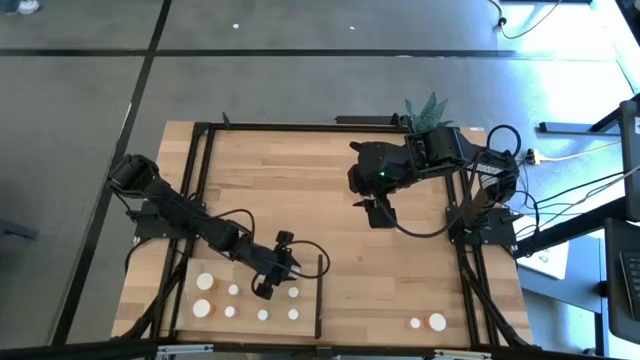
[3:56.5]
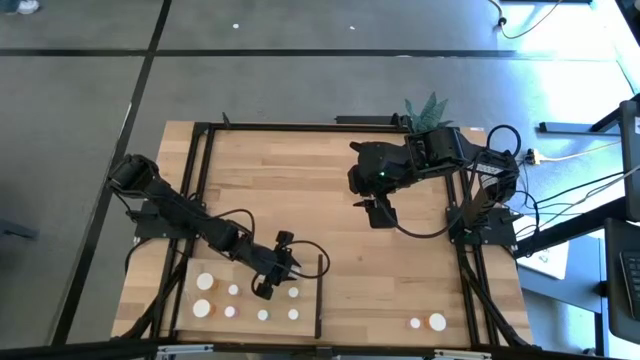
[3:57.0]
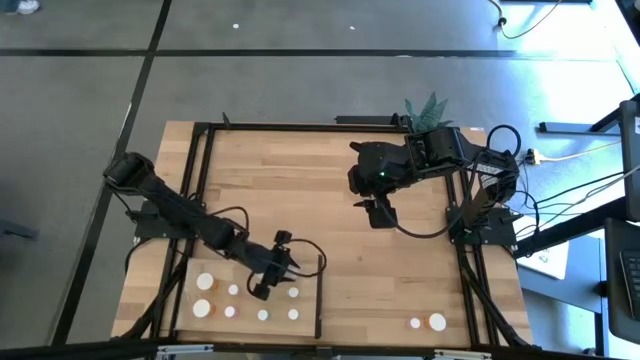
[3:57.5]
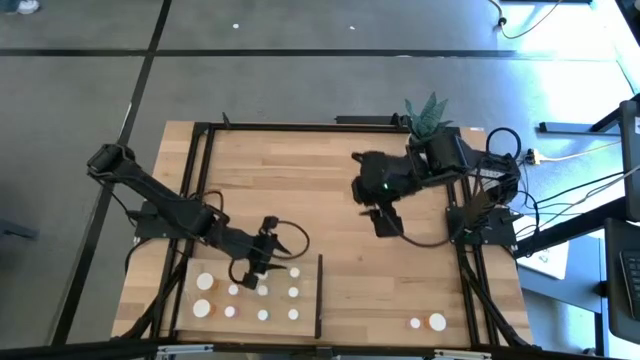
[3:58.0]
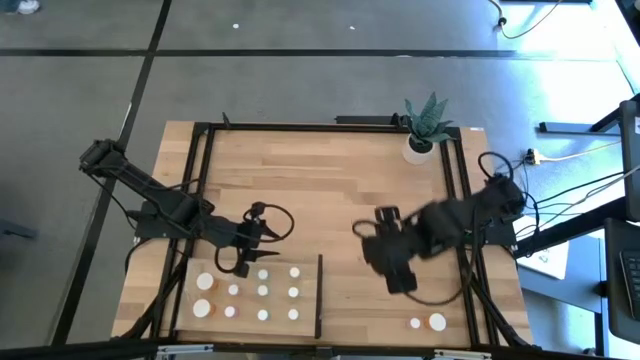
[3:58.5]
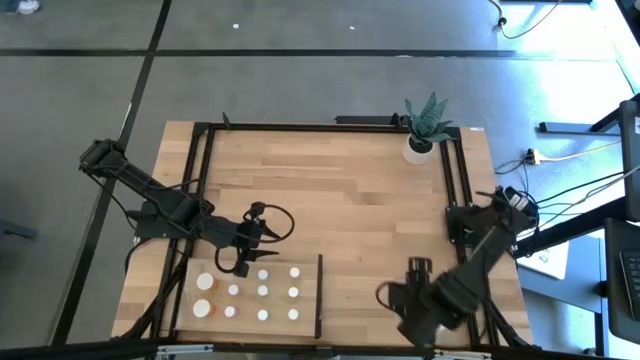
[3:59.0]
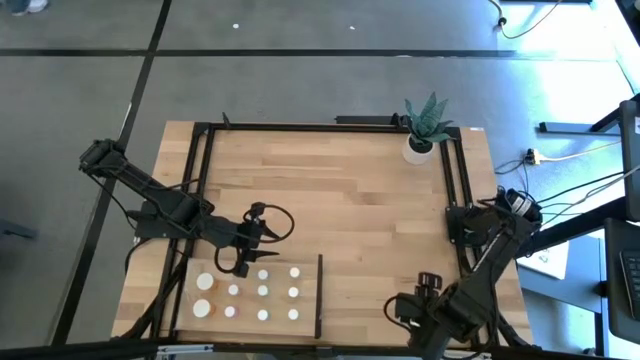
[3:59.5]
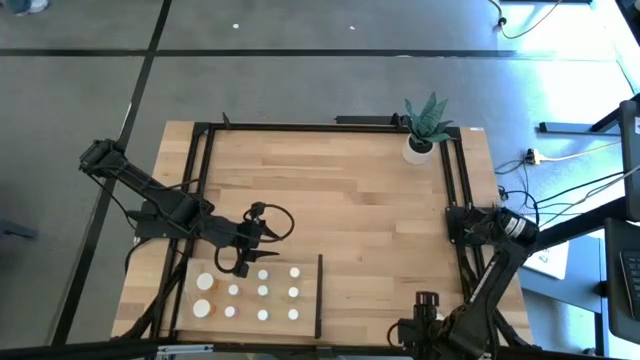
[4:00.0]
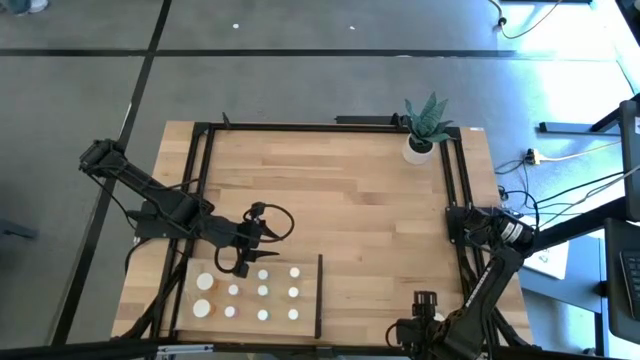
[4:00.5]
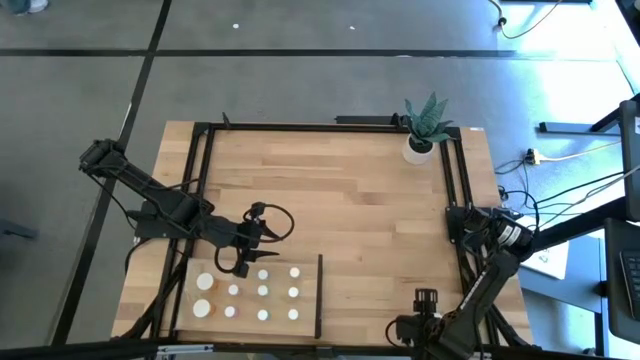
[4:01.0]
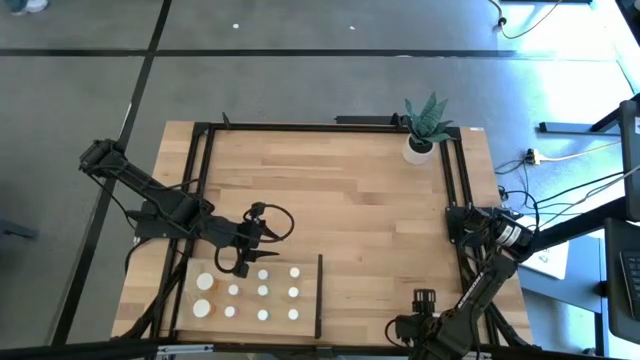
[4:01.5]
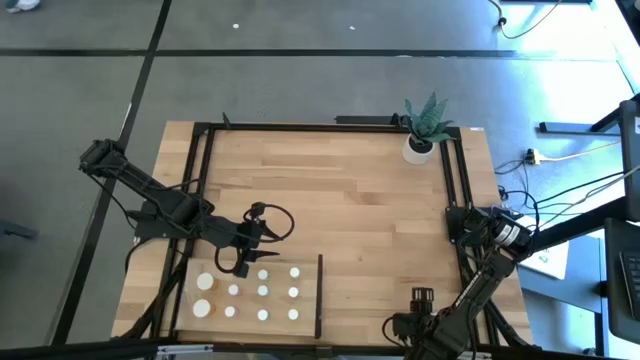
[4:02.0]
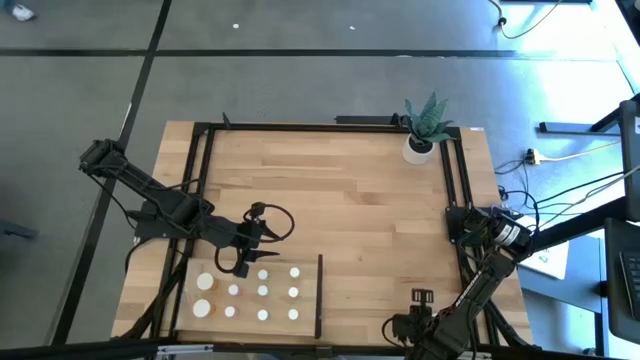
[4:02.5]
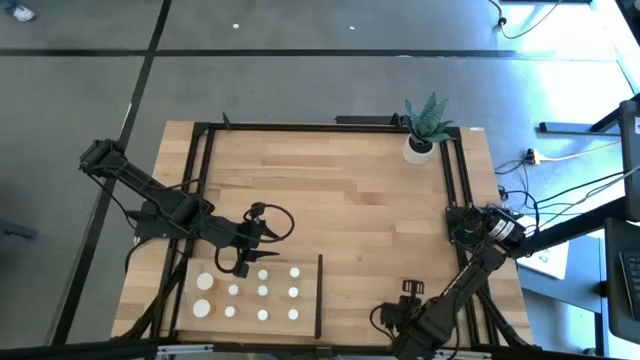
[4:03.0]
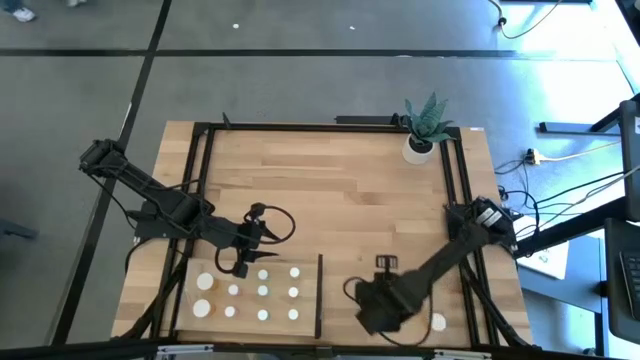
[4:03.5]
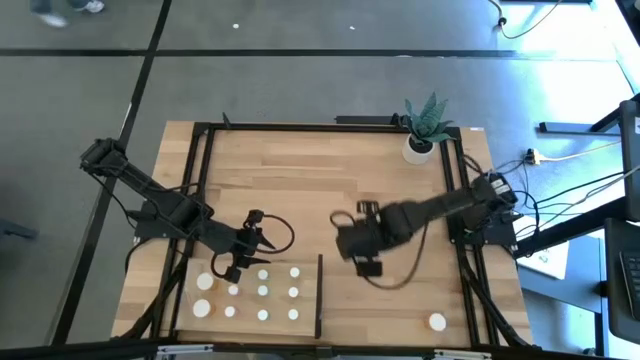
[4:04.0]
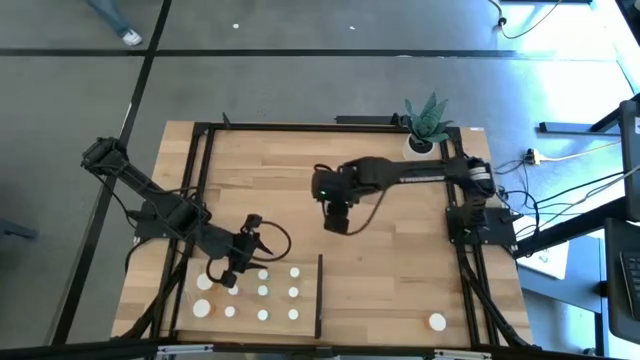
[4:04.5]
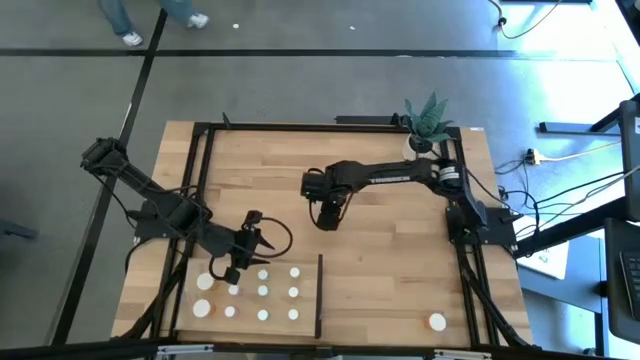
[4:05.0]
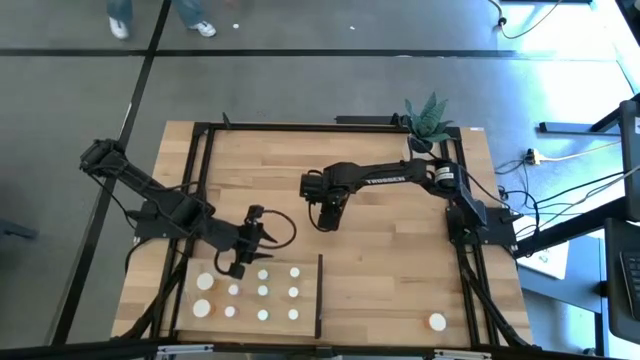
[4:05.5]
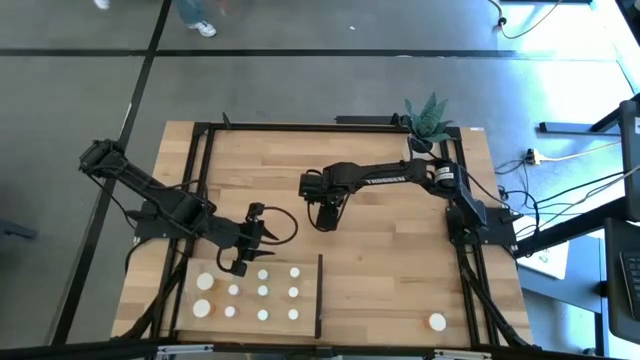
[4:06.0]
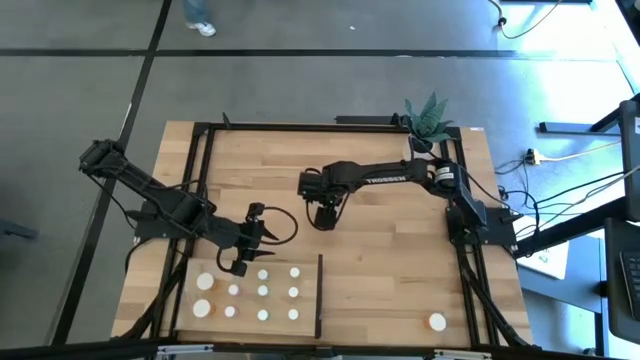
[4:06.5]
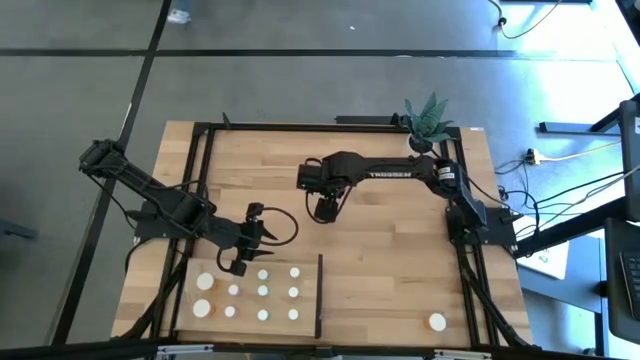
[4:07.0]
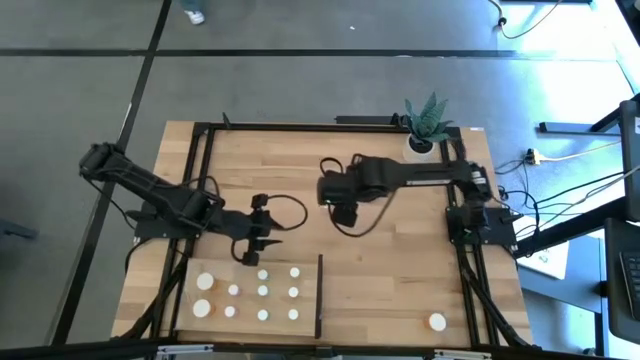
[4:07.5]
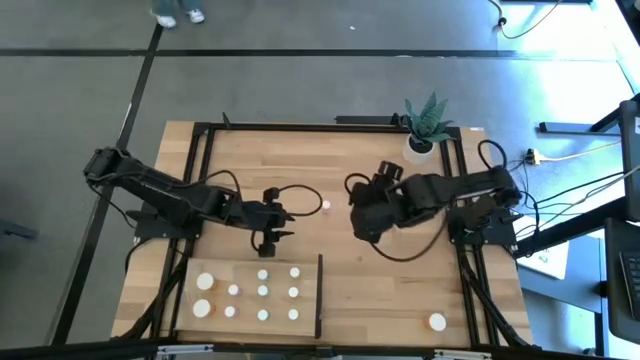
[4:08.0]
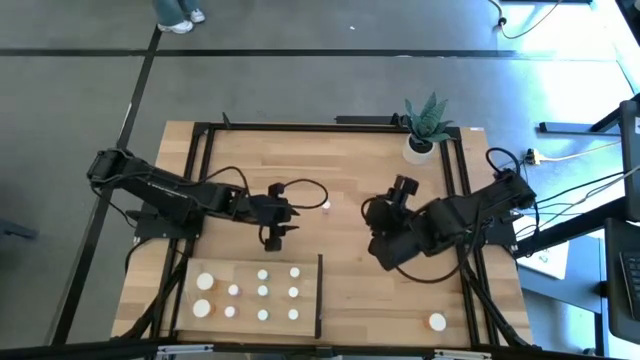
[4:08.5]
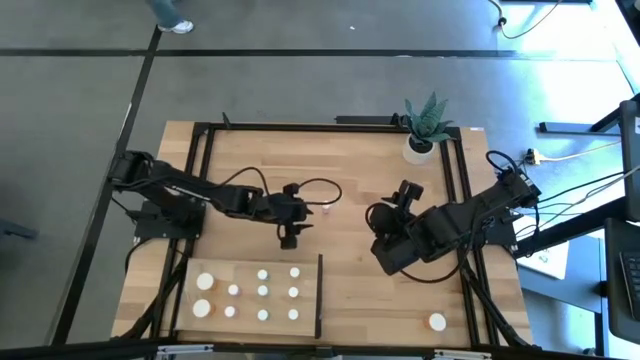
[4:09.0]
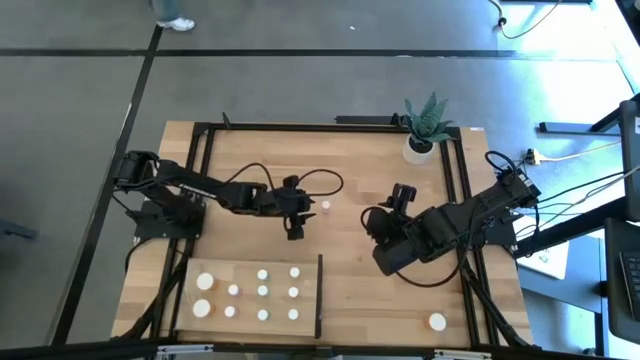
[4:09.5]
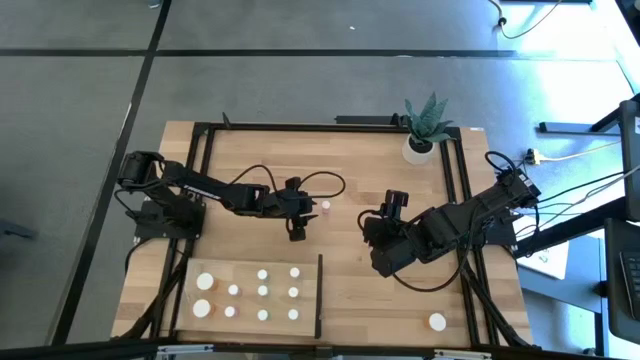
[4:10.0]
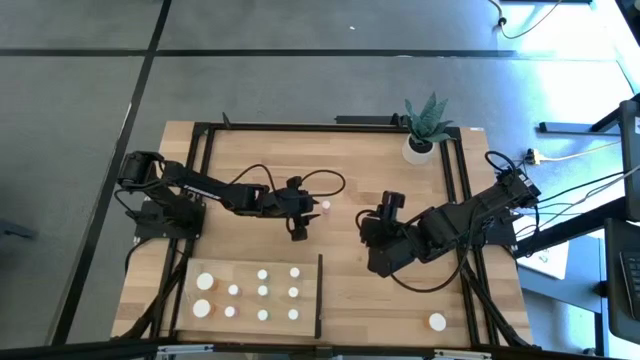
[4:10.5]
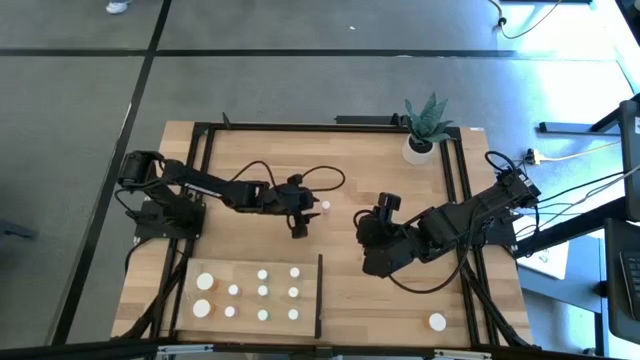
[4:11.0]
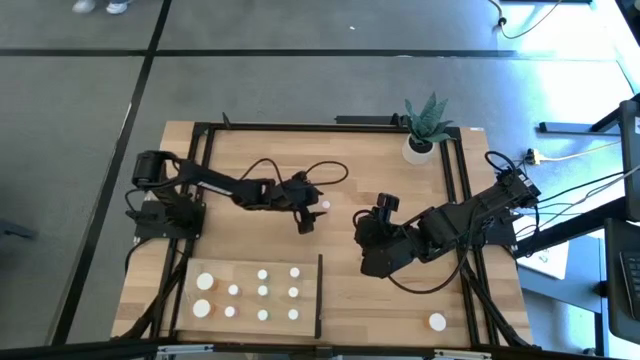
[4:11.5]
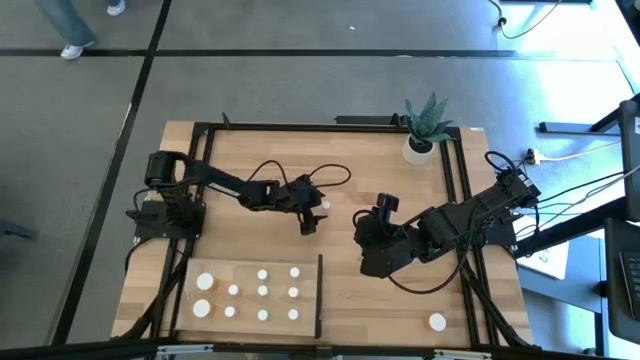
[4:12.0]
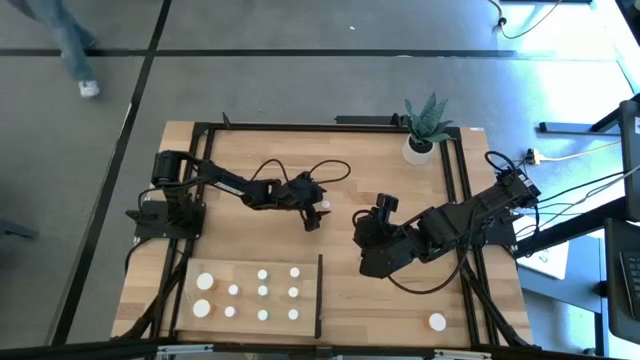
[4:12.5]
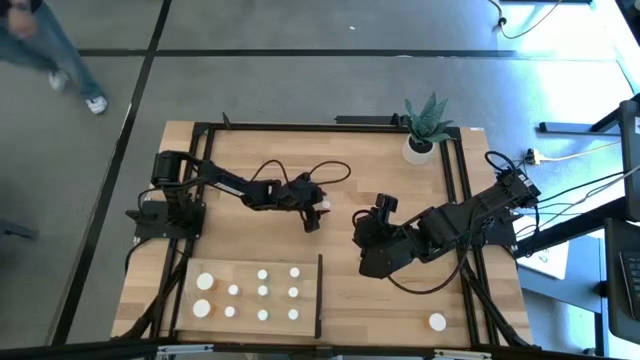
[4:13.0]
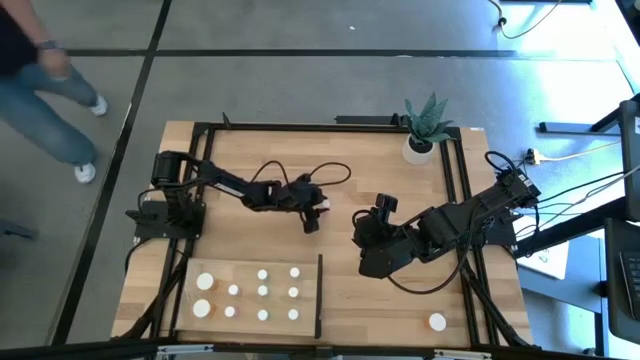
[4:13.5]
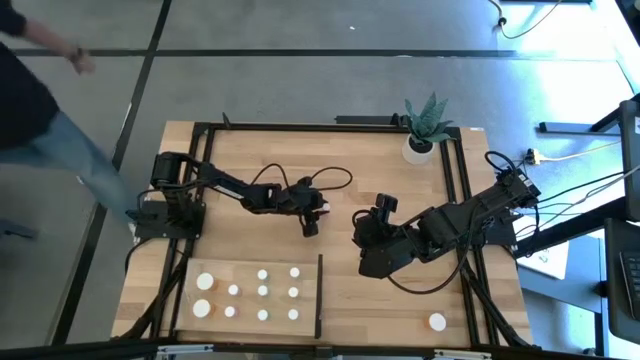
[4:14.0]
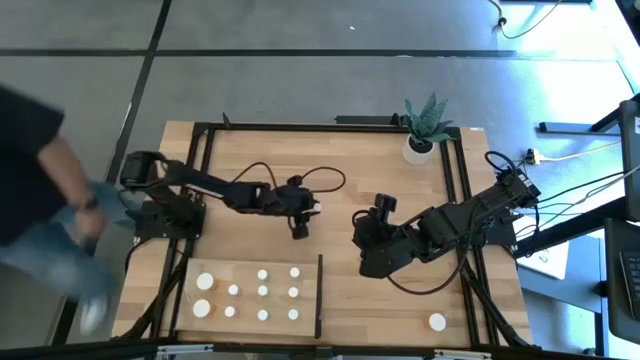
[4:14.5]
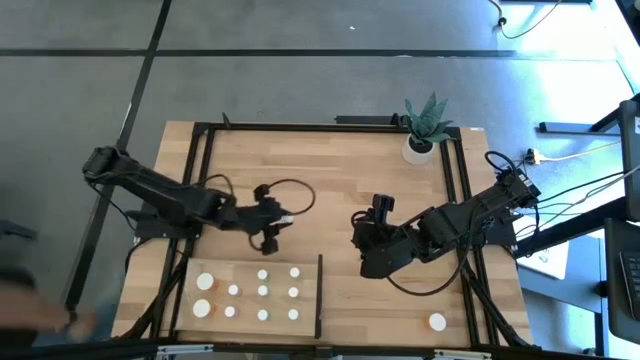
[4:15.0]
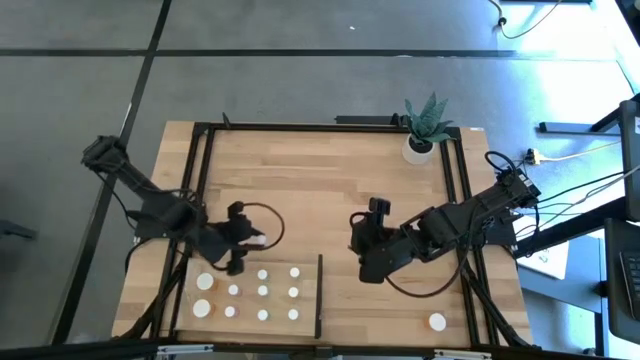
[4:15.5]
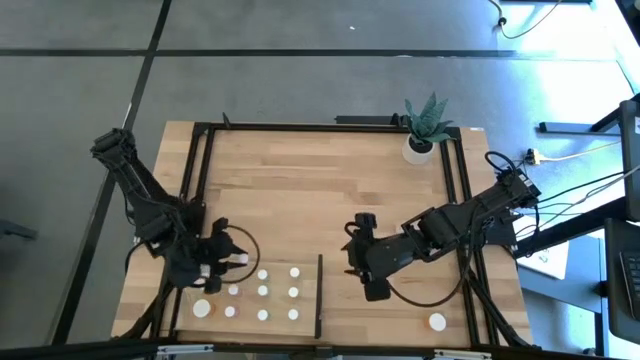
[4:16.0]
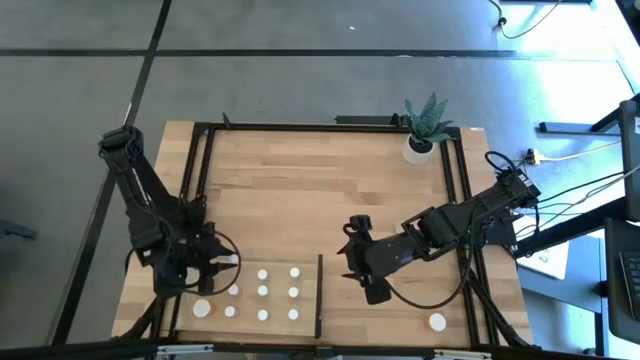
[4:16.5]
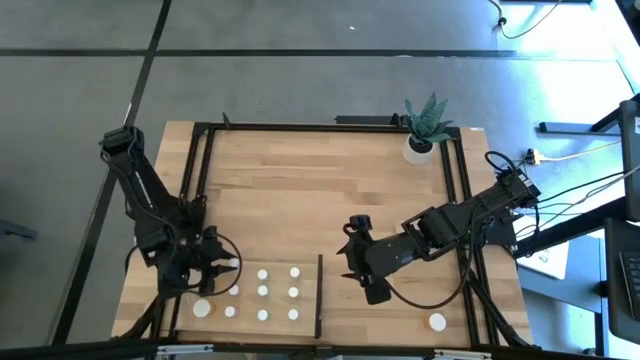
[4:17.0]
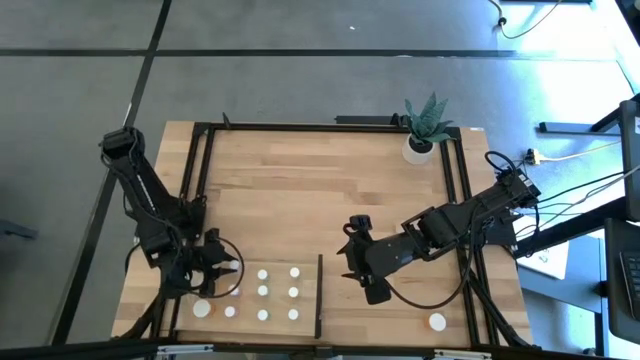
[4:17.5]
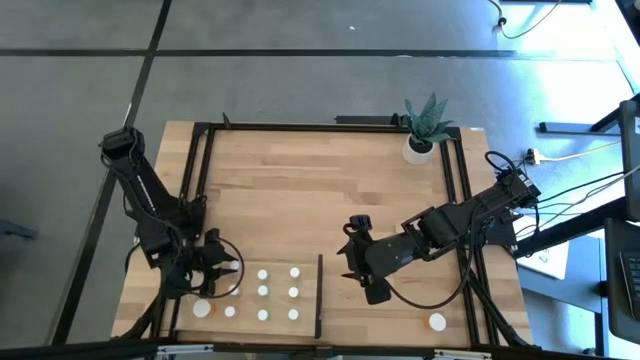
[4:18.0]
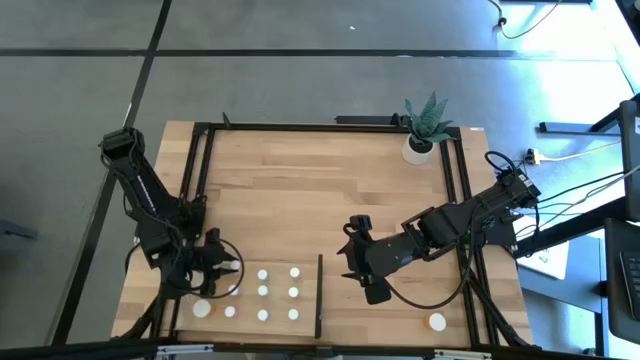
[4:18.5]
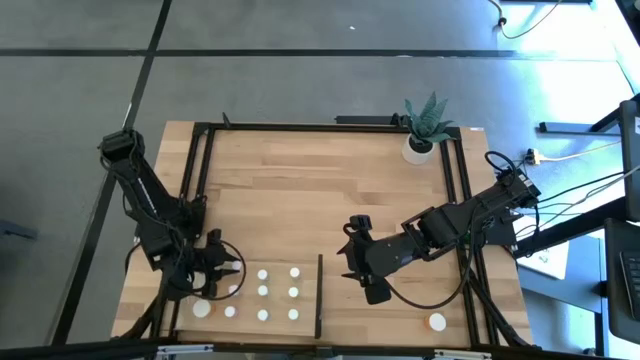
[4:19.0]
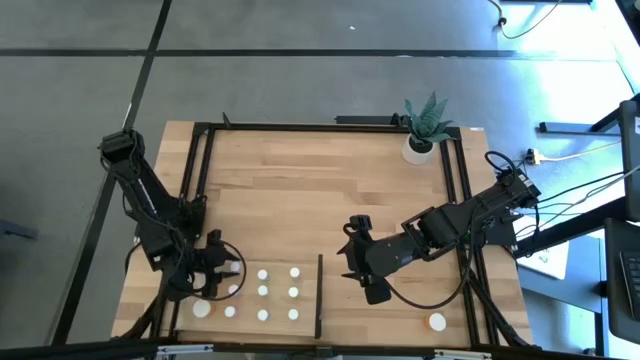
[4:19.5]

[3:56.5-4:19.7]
Task: Pick and place medicine bottles onto shelf by color
Put the pink pill bottle on the shelf aligned with the other pink pill bottle
